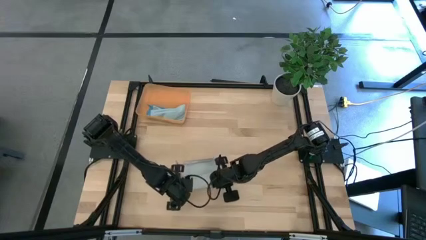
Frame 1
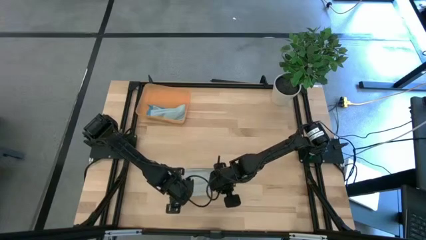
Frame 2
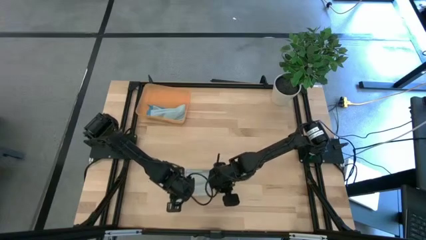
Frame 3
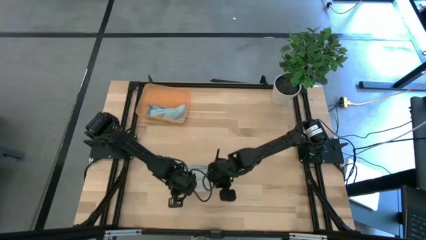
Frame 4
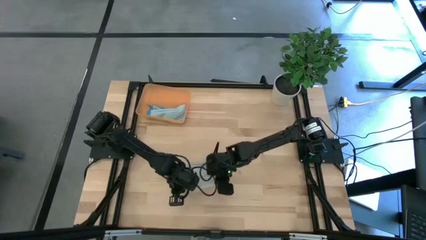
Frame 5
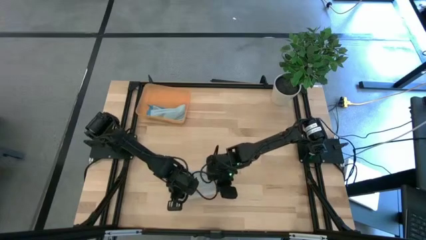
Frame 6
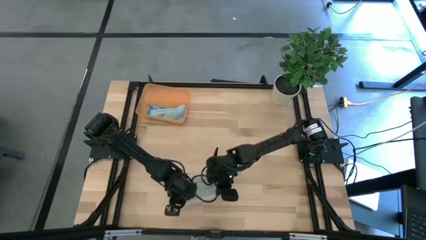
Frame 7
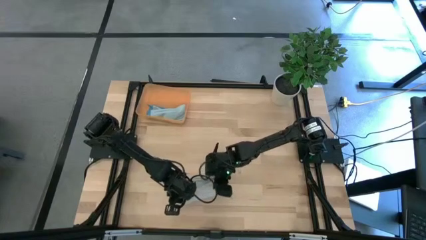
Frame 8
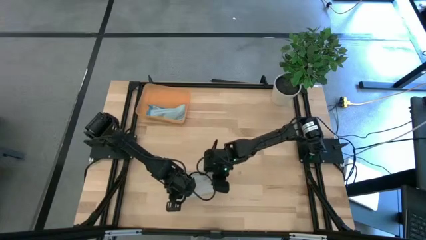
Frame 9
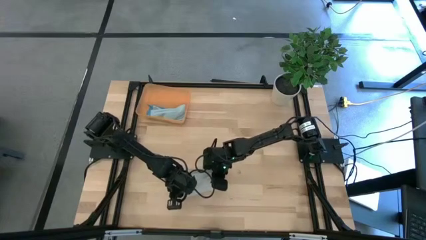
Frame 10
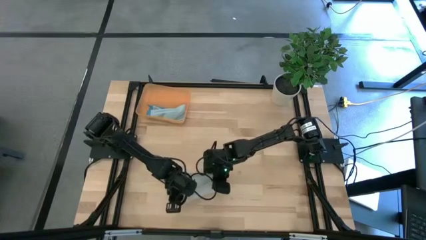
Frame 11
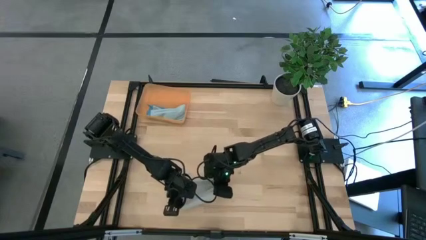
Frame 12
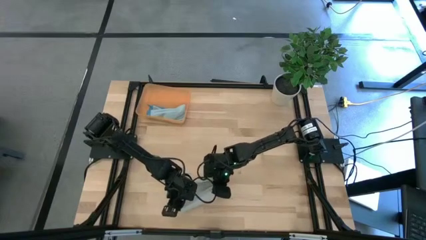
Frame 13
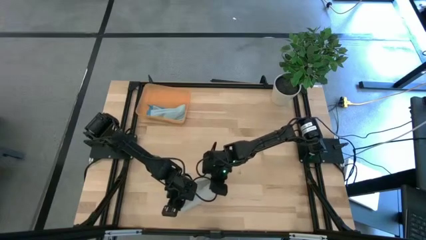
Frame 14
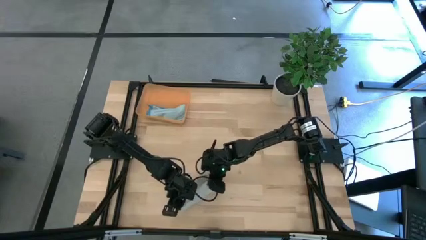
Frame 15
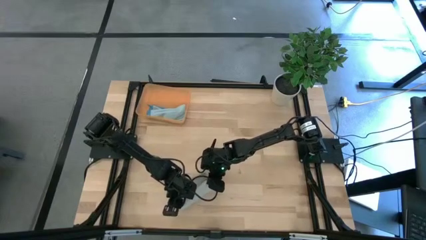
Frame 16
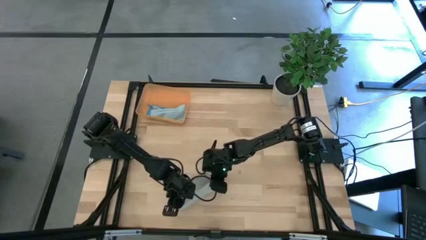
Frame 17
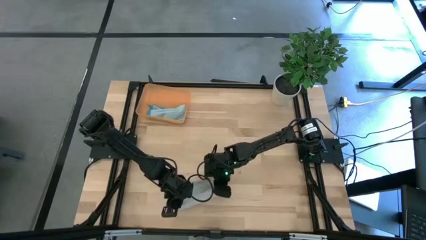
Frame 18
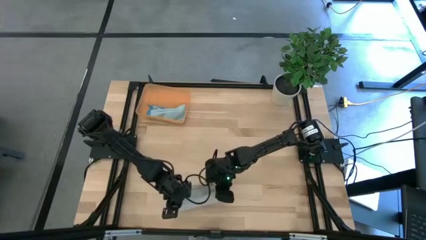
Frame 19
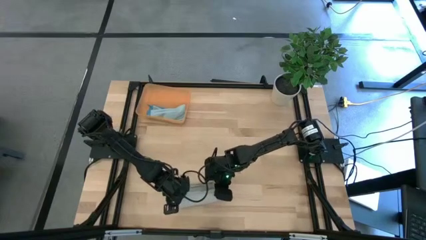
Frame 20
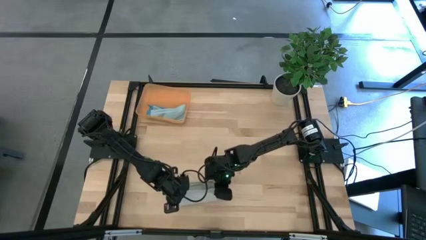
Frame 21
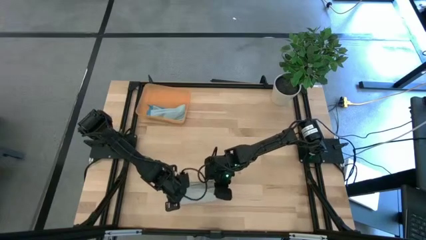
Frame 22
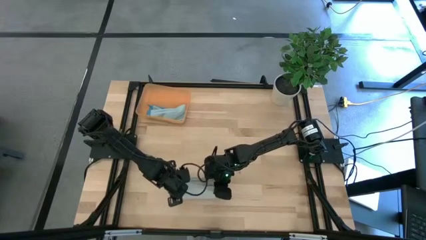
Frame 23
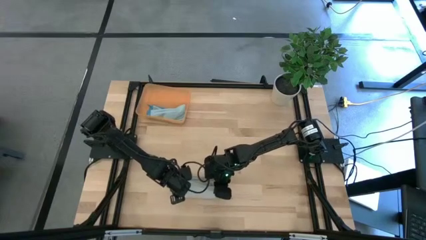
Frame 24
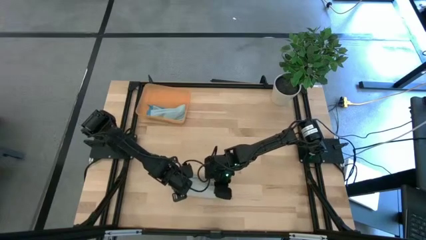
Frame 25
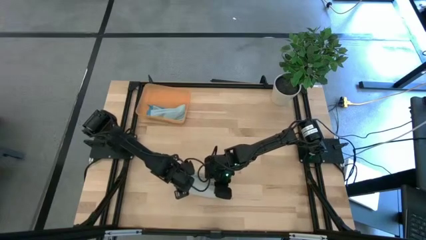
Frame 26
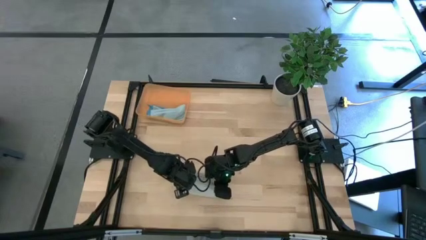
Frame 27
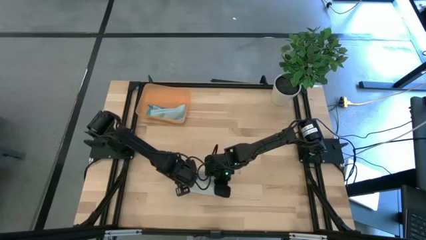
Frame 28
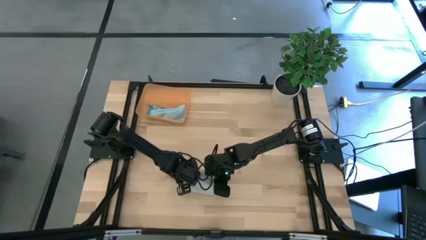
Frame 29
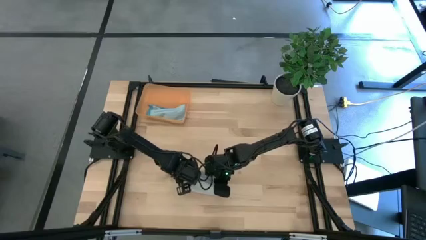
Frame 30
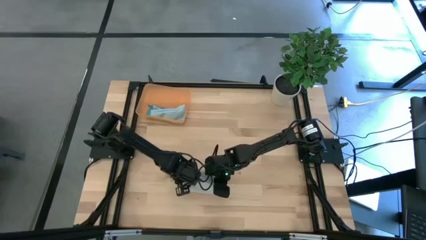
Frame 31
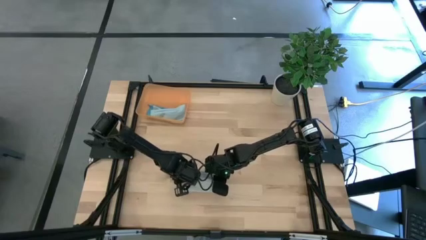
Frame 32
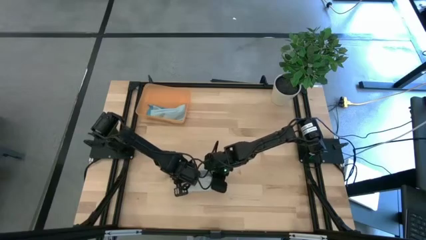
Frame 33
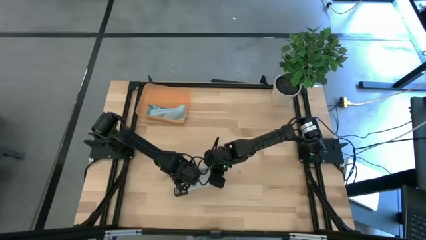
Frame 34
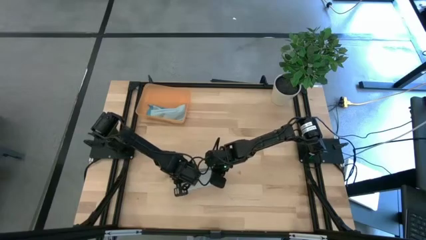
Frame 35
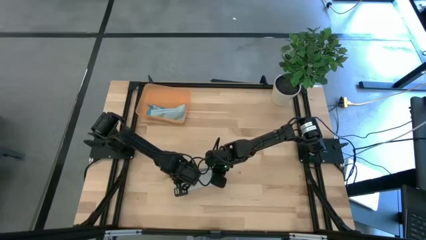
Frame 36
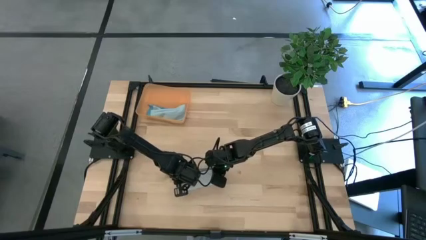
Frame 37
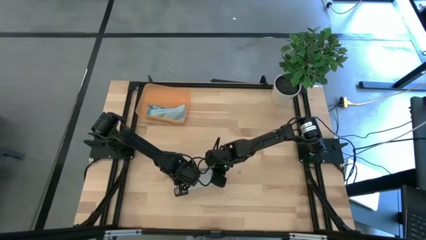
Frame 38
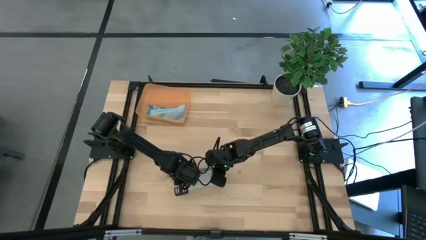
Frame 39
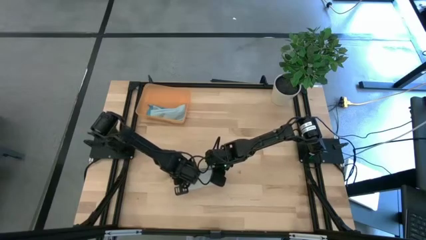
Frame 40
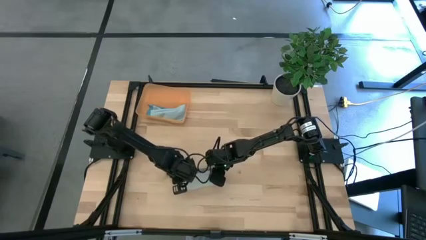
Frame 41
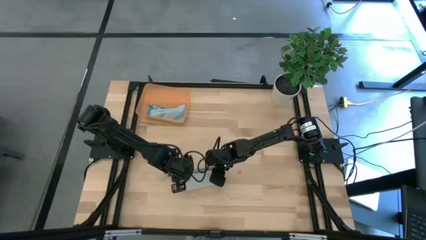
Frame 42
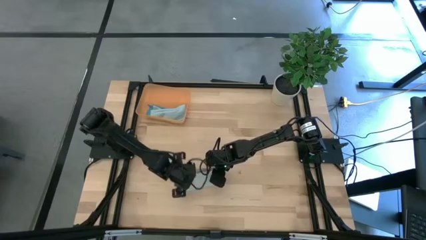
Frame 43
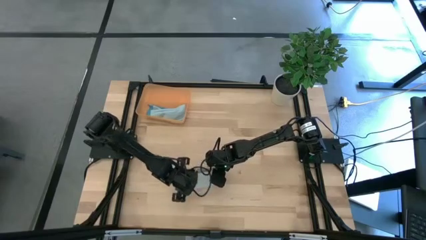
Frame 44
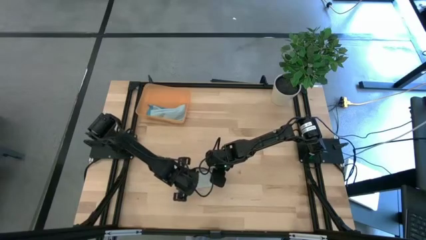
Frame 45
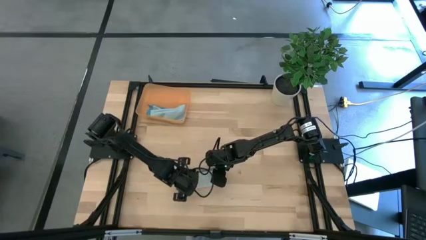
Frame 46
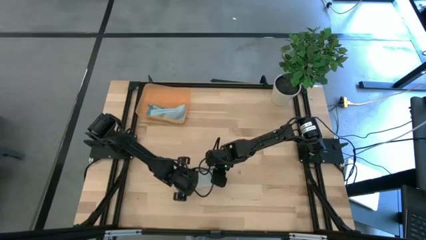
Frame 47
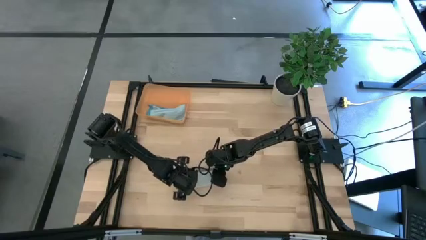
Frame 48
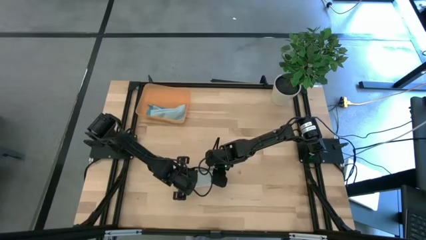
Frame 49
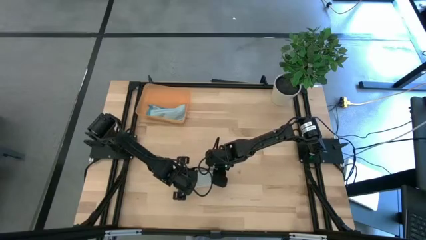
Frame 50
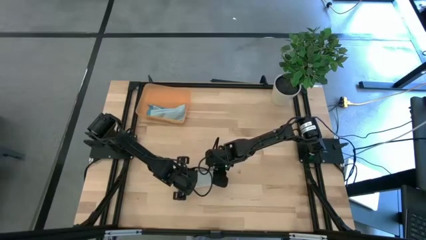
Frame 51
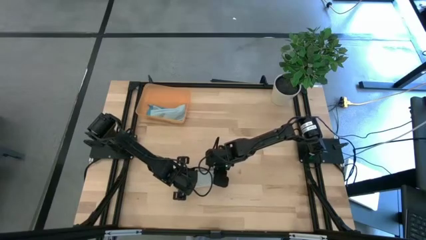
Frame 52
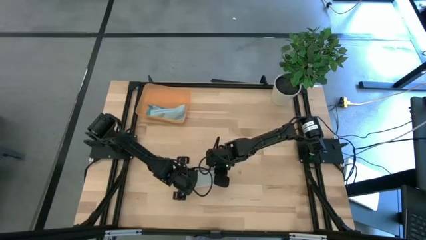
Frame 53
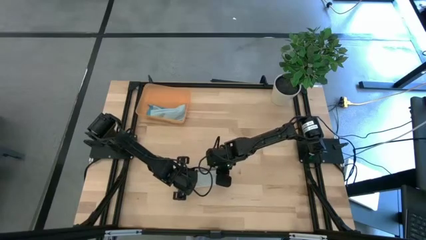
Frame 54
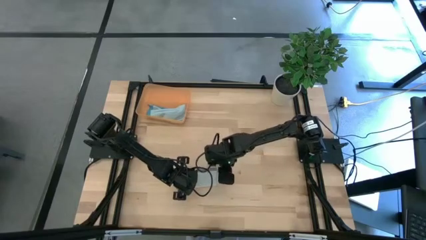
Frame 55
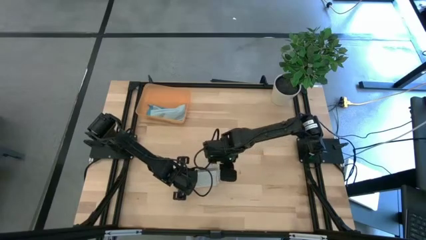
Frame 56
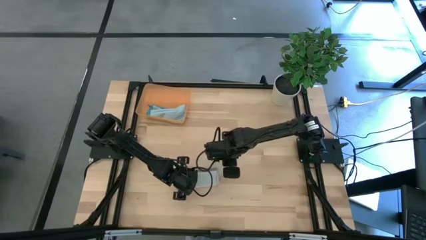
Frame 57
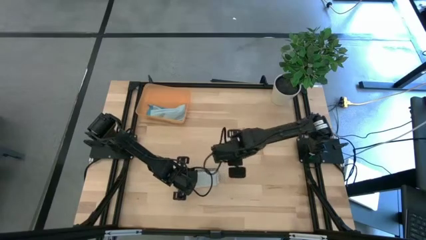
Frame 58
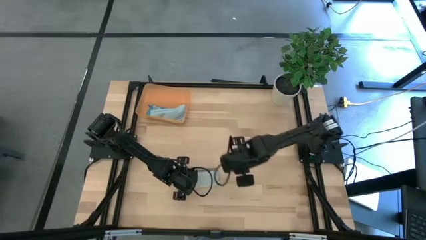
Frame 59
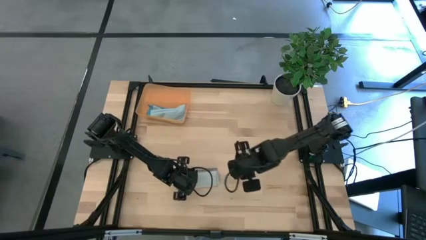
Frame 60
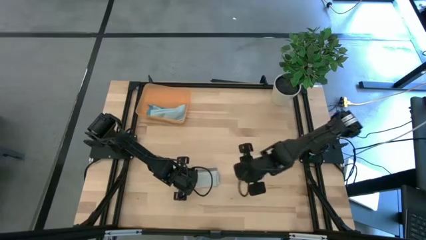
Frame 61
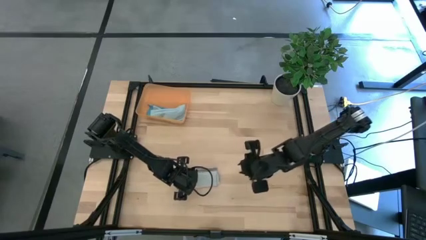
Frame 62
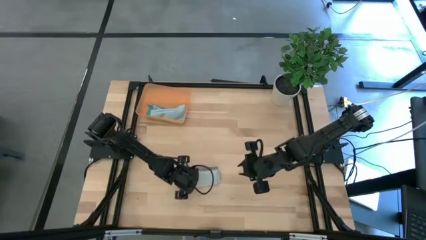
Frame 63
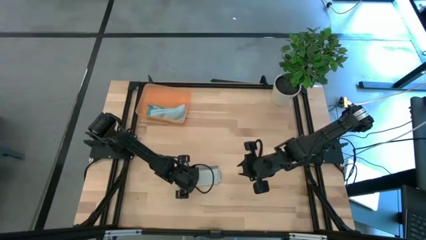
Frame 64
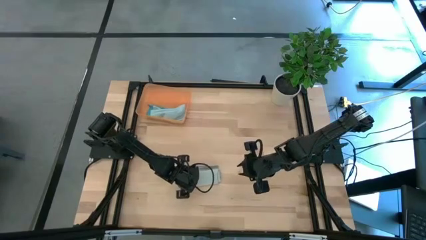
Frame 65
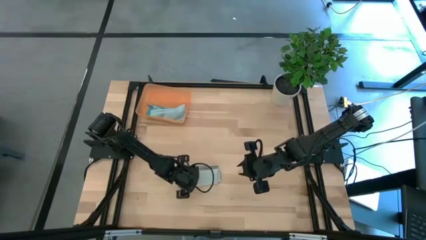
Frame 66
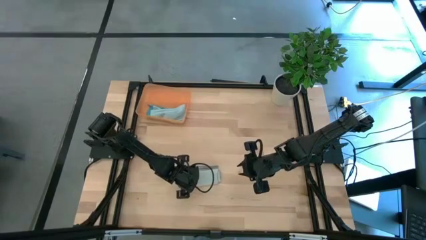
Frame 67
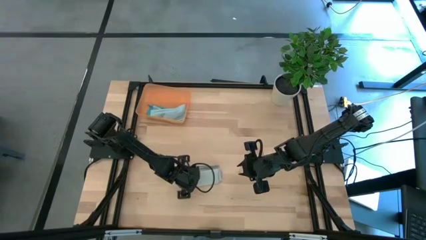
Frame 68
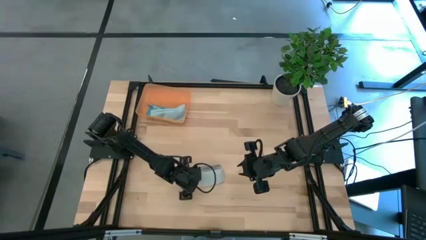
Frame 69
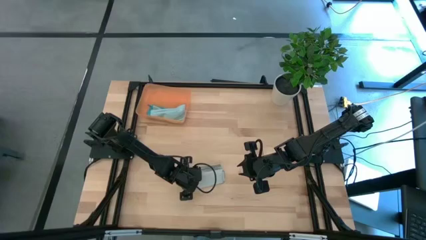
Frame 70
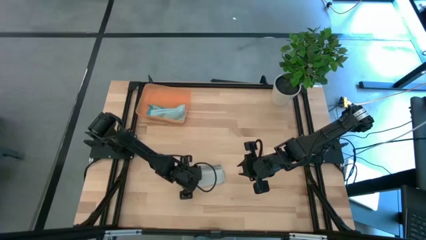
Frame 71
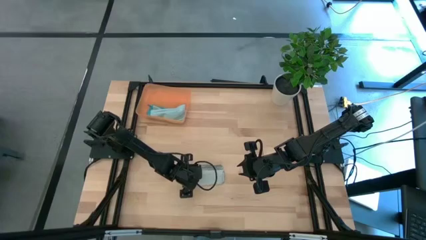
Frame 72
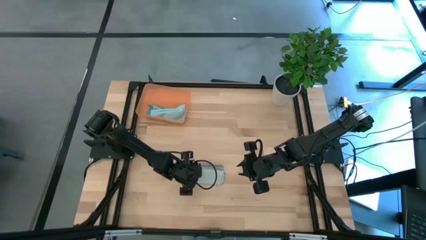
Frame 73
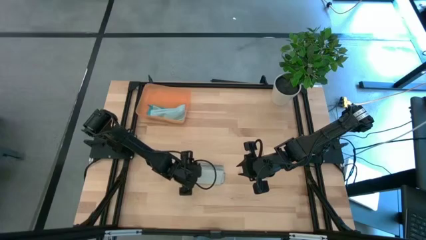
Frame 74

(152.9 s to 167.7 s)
Task: Roll microfiber towels into tight, uniform cylinder then place into a basket
Roll the gray microfiber cloth
